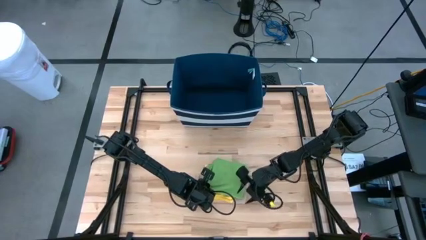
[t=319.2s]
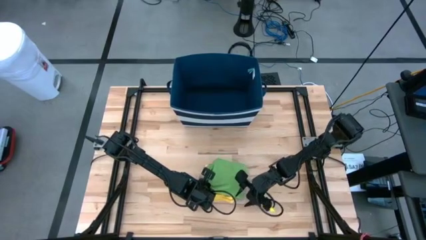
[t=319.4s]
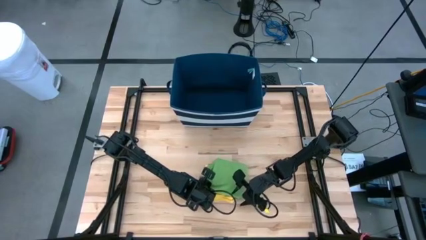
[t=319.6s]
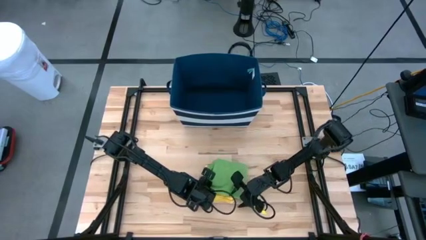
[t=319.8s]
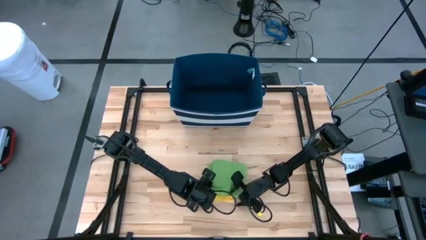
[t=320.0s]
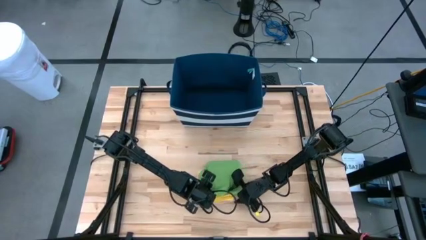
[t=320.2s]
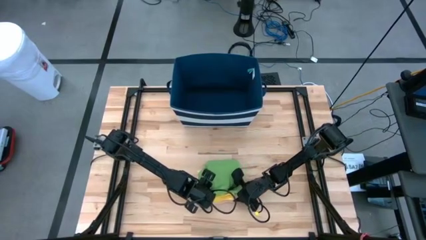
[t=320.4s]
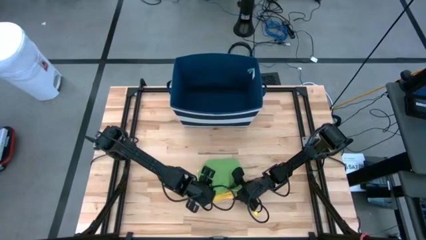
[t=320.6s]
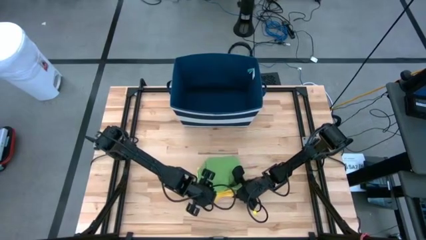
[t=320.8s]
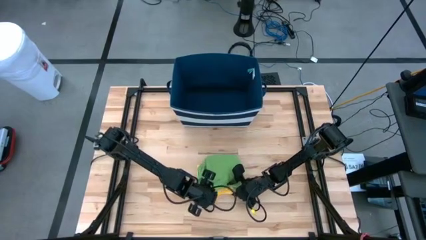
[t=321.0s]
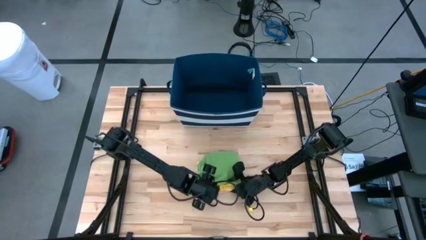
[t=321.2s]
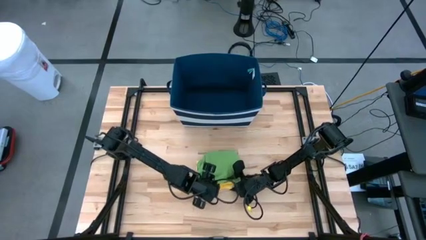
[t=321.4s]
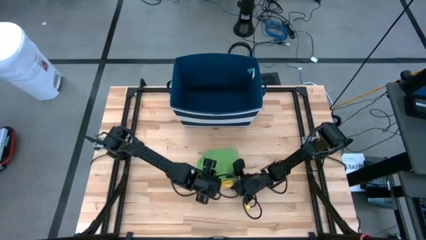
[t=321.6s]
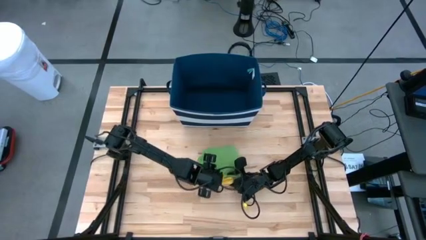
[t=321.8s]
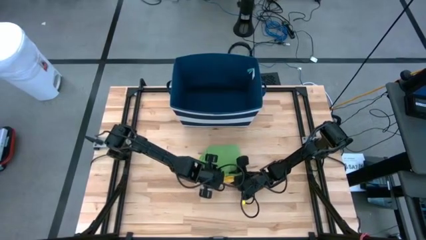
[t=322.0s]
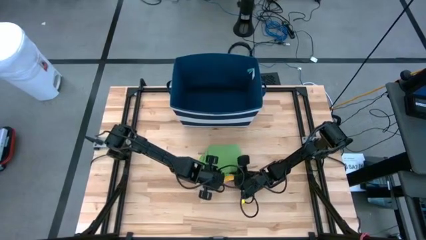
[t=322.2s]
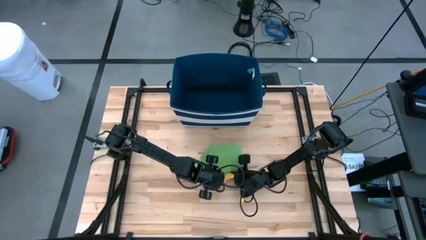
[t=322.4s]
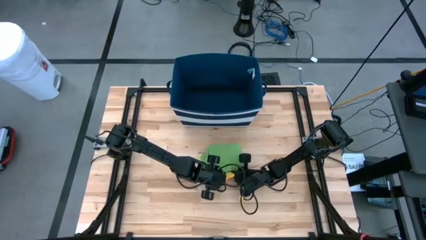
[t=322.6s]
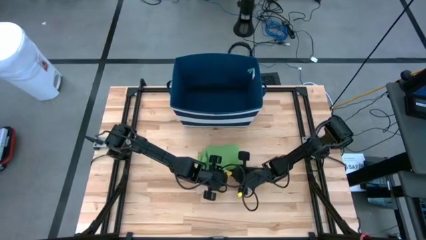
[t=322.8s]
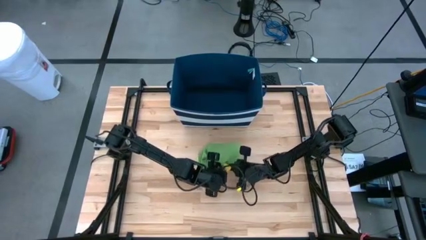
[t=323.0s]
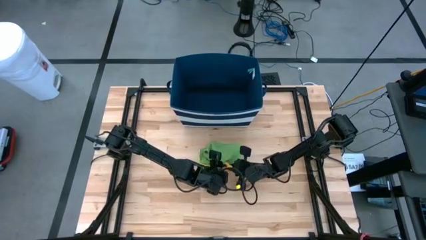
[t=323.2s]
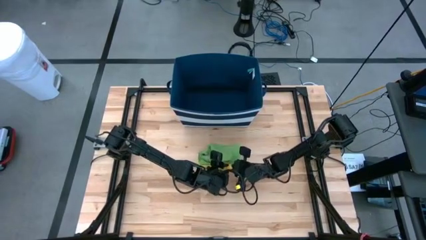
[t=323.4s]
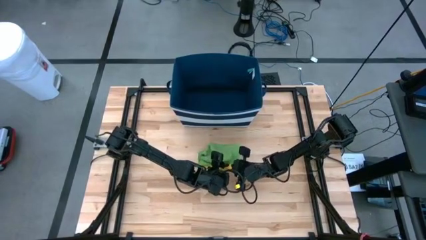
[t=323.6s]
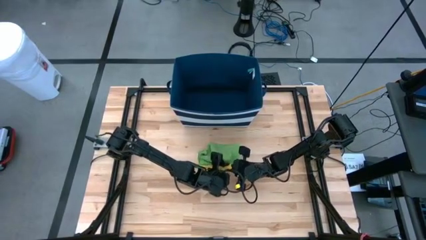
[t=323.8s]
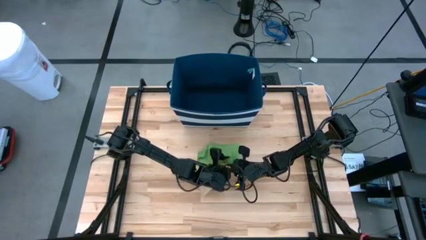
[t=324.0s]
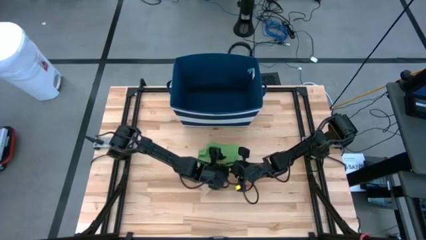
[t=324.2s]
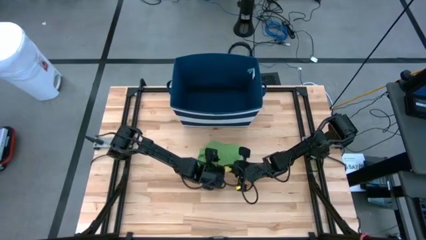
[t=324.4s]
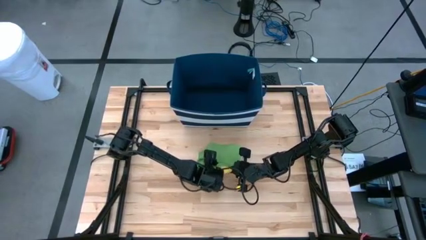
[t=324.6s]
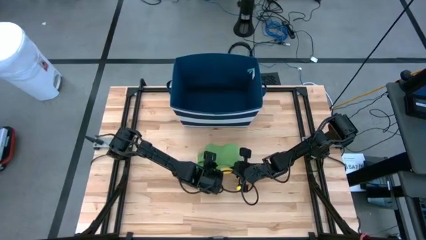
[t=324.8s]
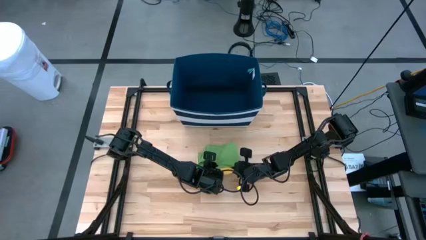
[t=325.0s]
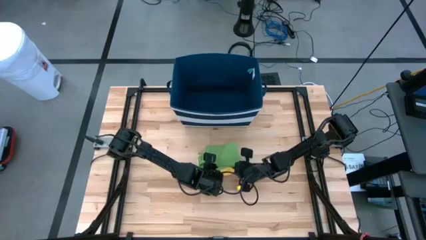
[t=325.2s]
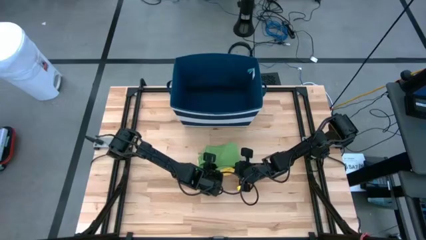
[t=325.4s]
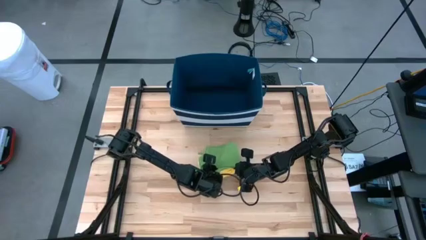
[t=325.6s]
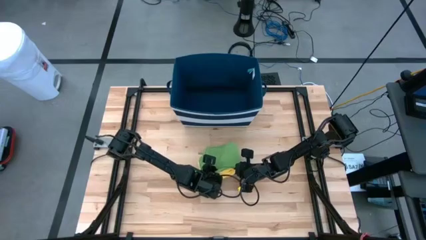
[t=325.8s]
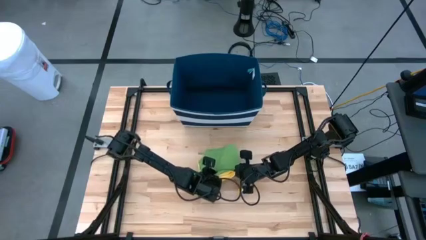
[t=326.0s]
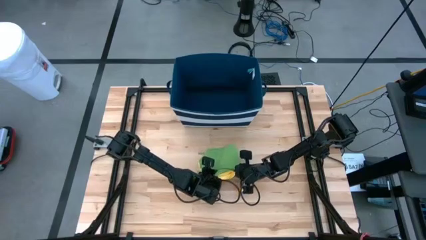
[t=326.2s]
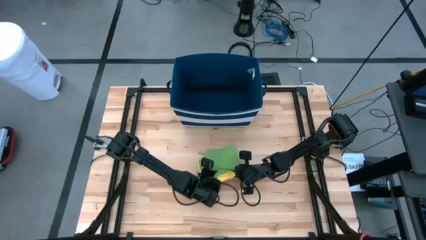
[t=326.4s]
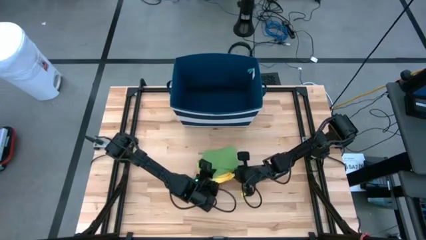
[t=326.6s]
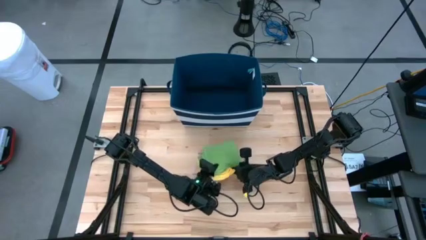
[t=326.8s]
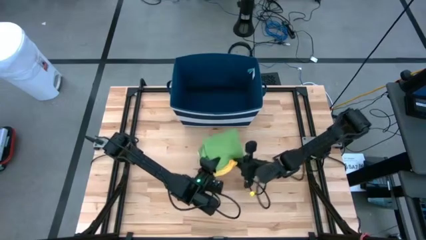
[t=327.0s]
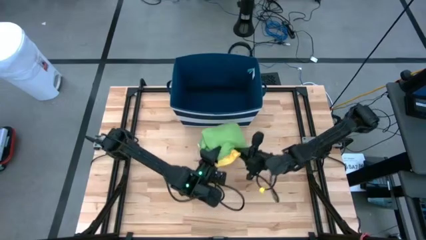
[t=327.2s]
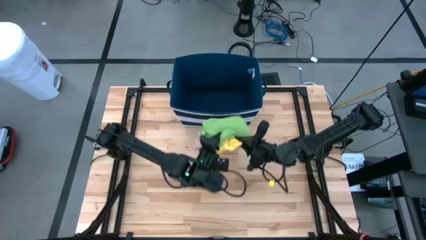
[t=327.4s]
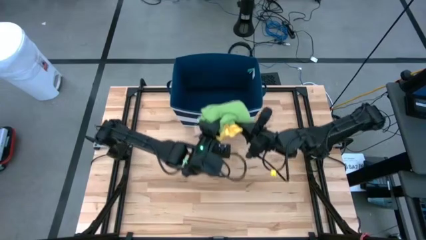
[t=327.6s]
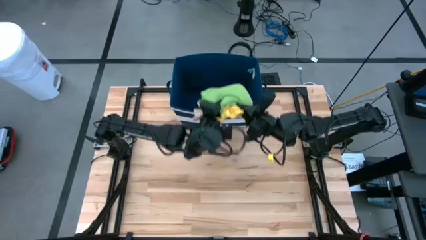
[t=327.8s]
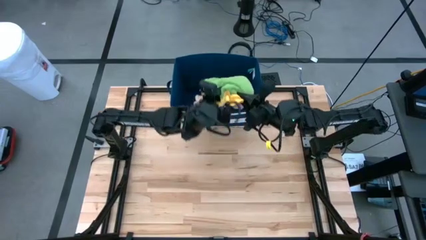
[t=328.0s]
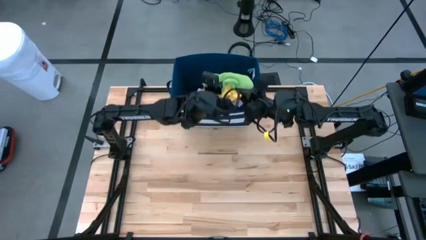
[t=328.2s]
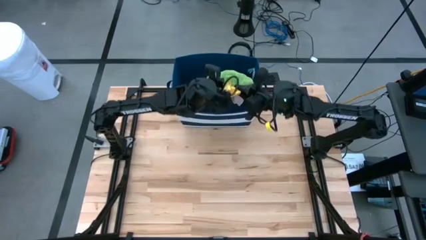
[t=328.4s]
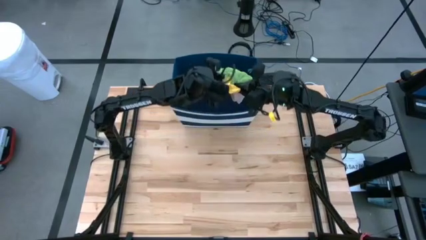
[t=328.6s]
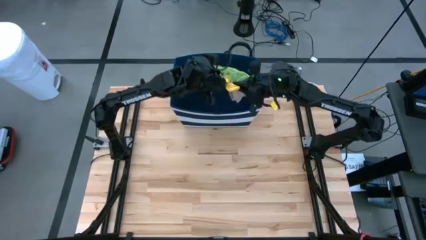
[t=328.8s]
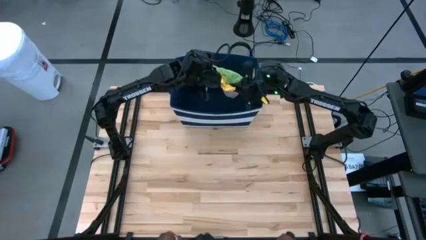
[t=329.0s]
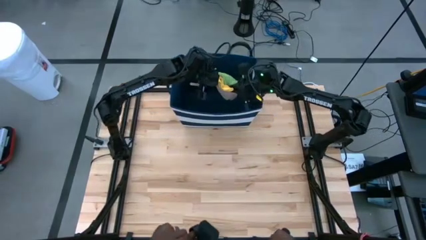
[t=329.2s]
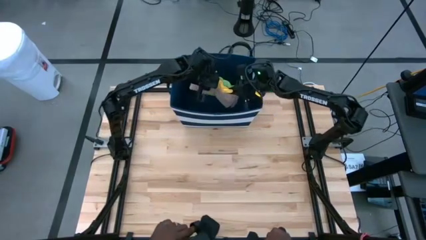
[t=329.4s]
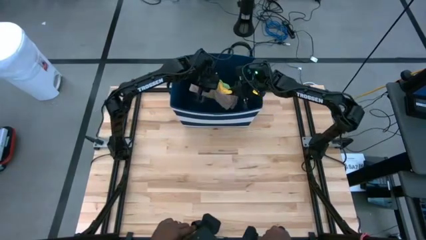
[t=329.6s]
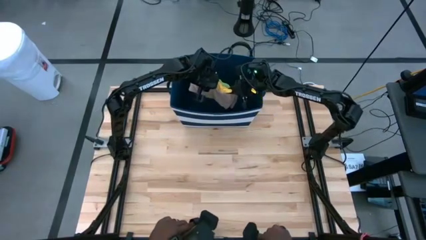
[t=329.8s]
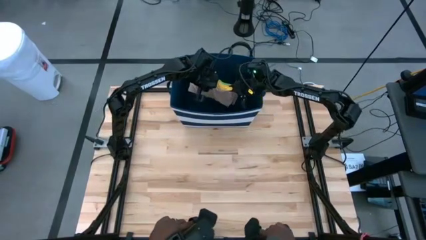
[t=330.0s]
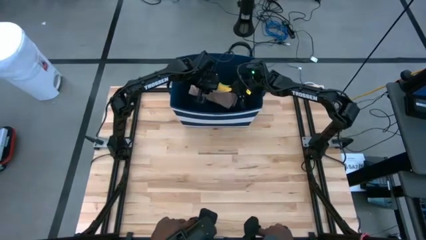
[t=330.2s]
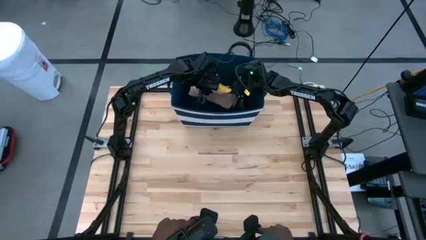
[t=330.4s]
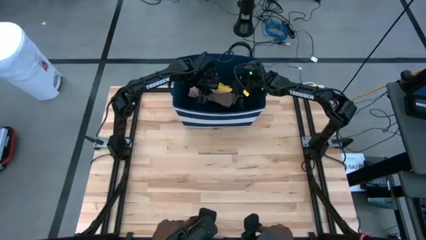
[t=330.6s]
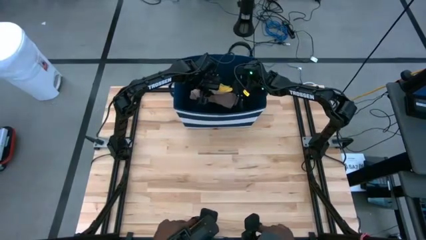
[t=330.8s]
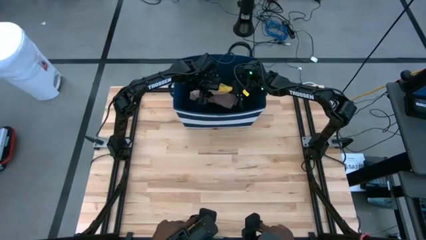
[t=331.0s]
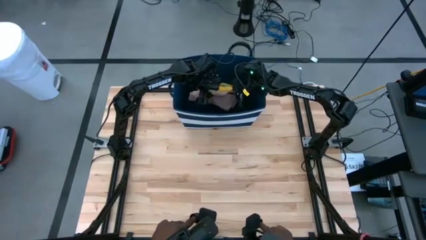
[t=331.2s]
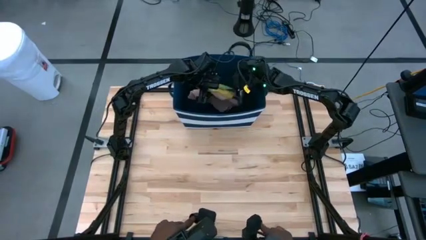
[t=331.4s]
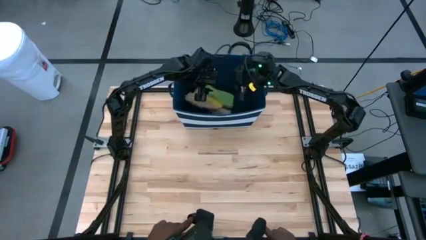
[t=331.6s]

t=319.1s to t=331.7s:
Task: Fold towel
Put the stacked towels into the blue bin

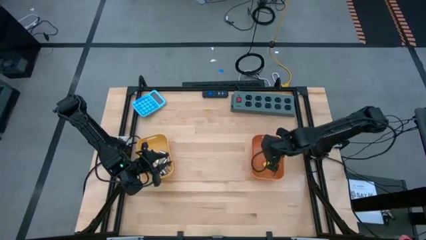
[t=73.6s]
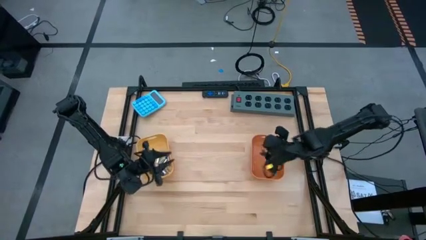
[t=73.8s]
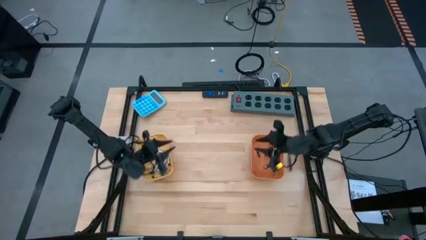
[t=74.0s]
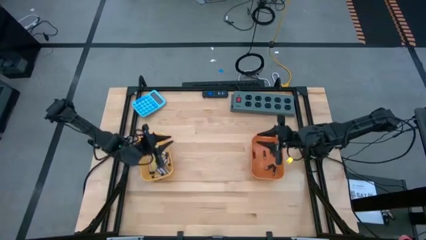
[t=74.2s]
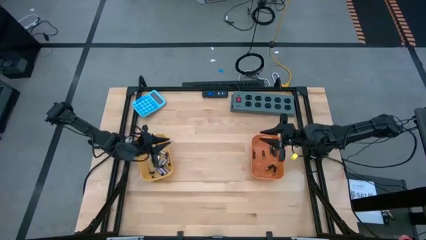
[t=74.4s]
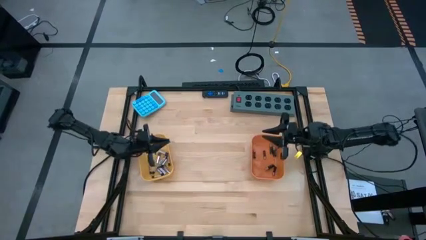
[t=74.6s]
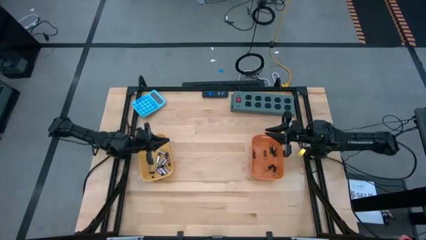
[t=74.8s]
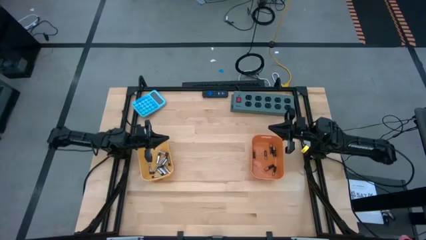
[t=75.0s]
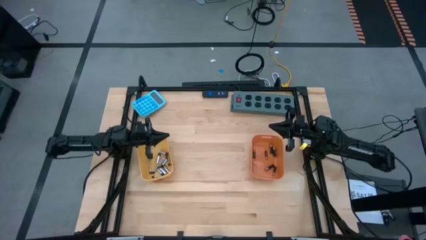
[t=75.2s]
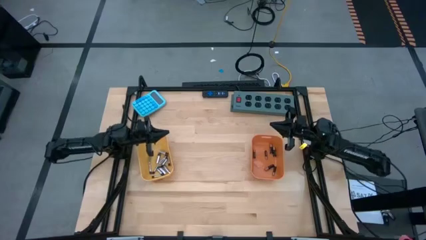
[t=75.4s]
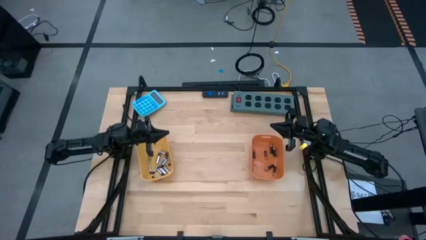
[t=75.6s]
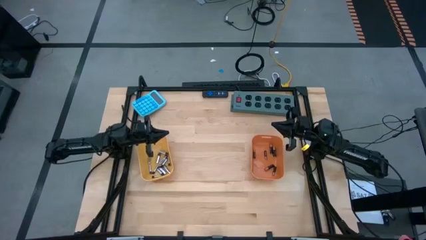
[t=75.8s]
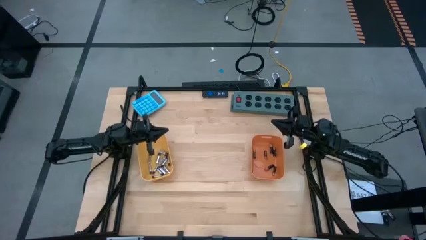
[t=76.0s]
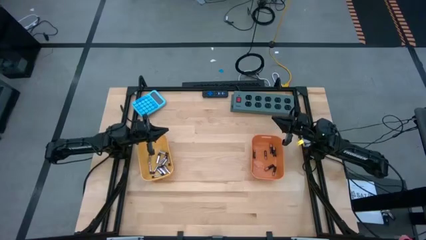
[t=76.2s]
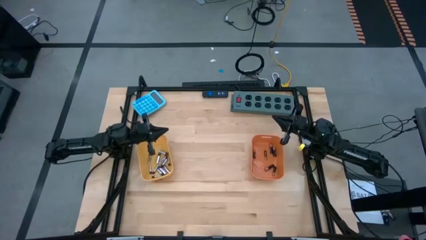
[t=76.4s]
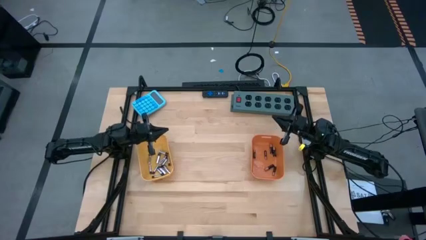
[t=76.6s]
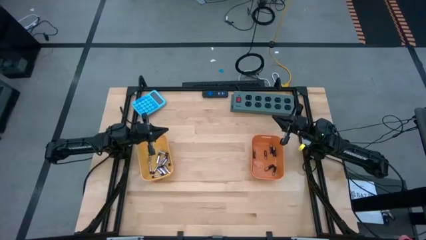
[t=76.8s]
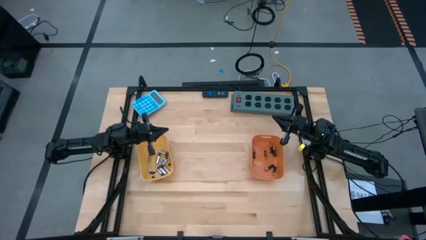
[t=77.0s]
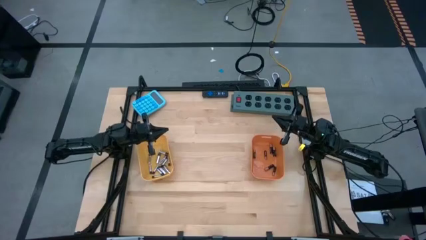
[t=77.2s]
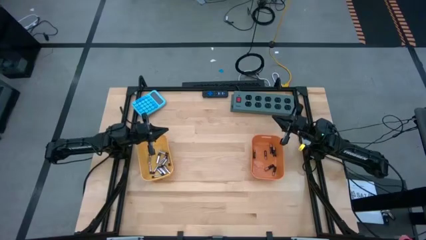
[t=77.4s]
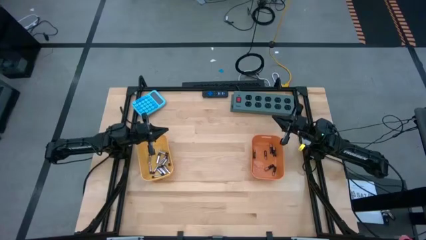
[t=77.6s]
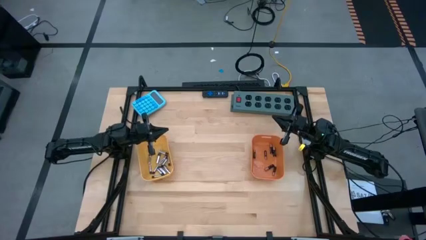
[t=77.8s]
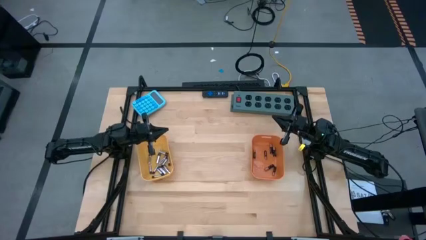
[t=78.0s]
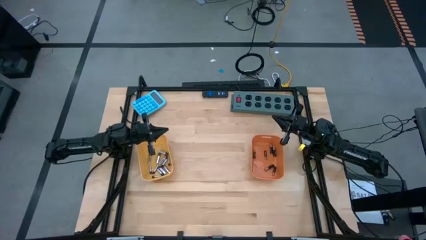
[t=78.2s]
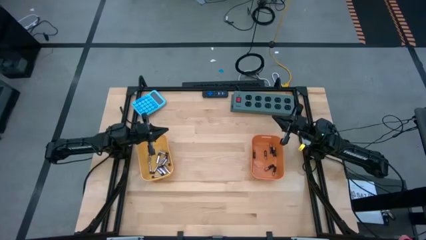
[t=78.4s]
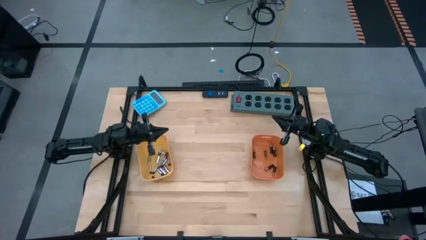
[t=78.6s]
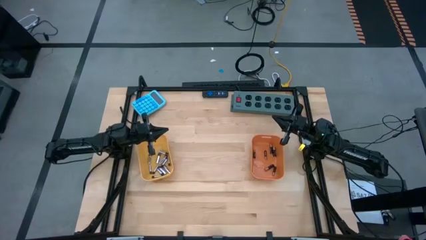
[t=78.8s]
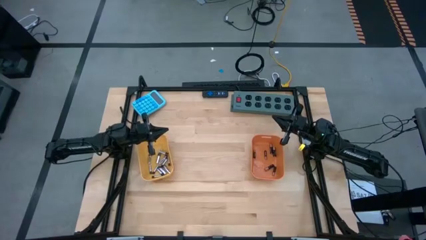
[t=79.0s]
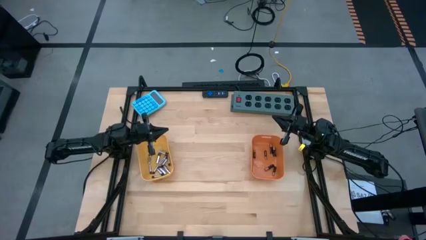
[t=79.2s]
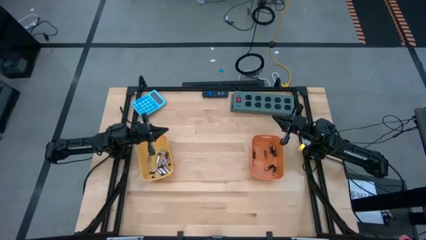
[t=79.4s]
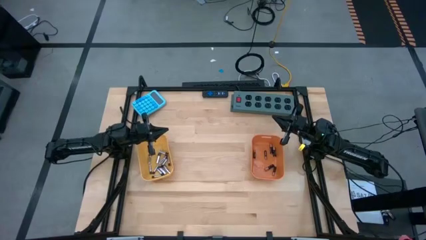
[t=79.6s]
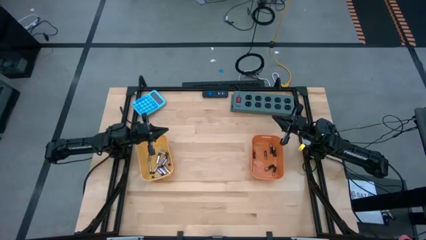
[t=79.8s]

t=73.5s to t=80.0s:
Task: Sort batteries
Return to Home Position
